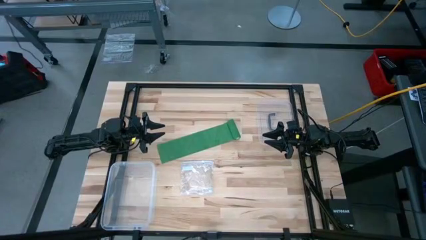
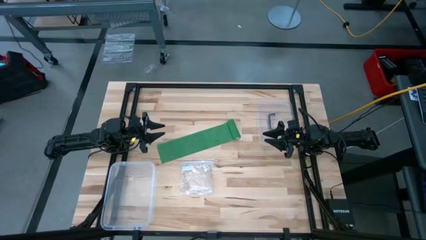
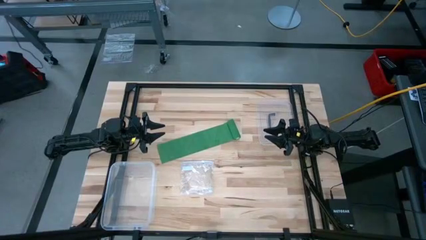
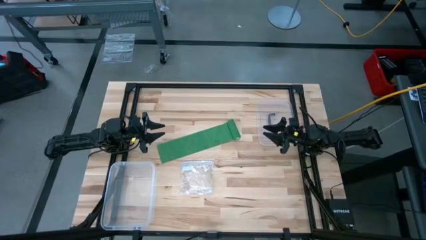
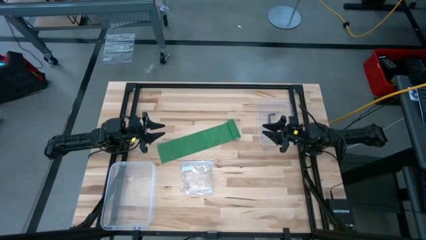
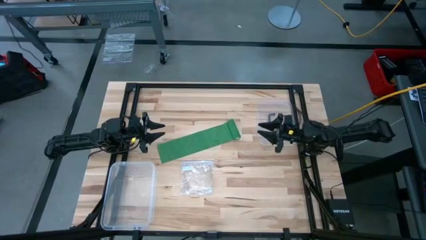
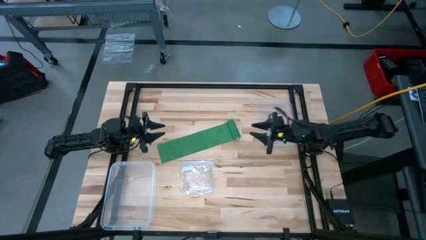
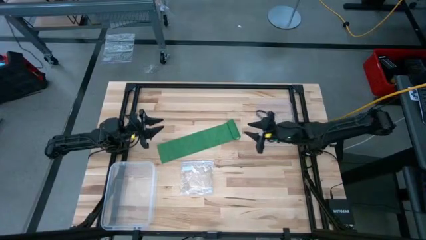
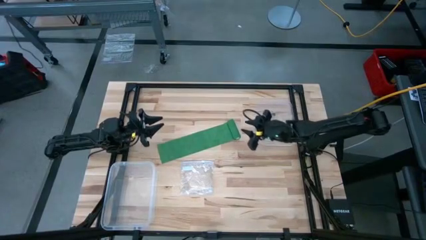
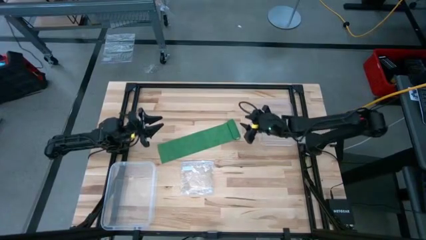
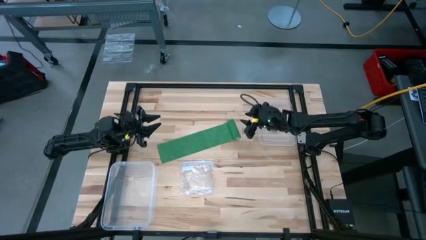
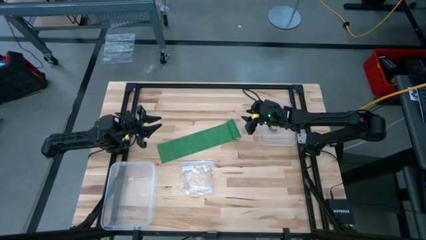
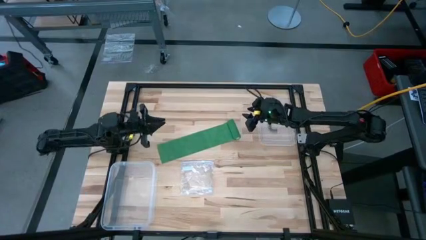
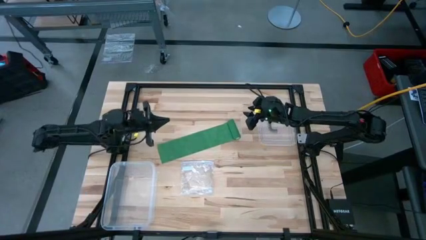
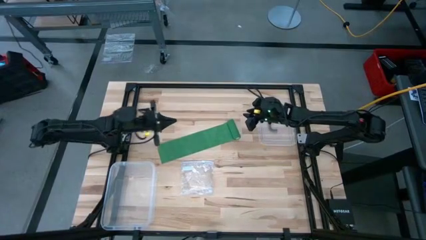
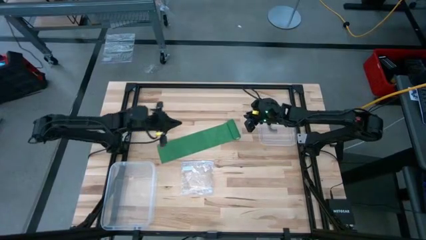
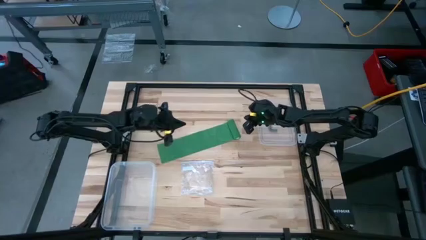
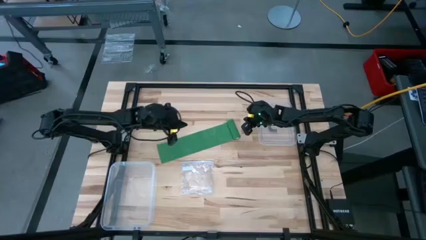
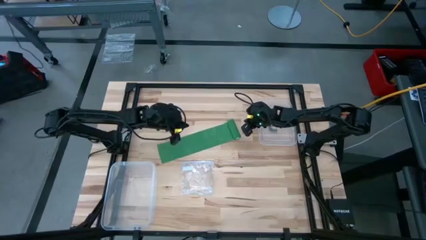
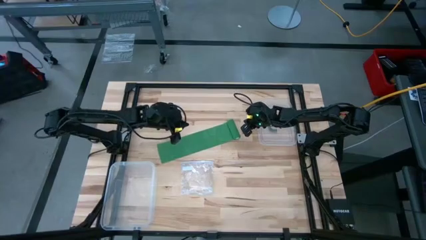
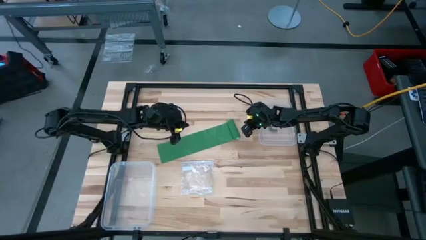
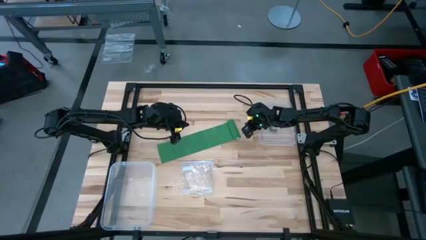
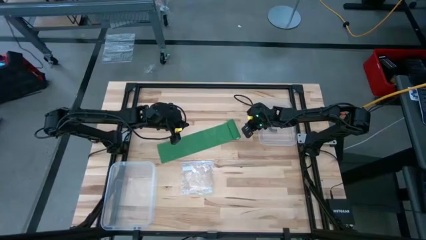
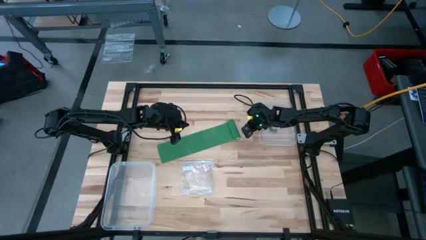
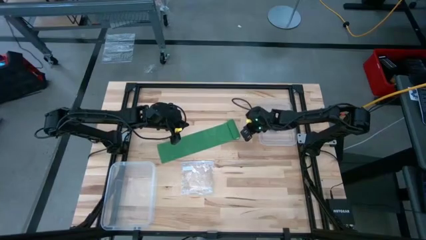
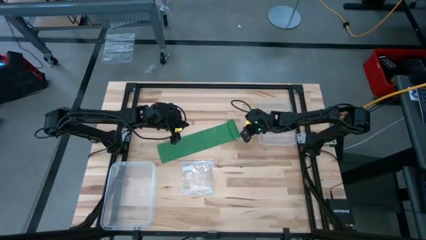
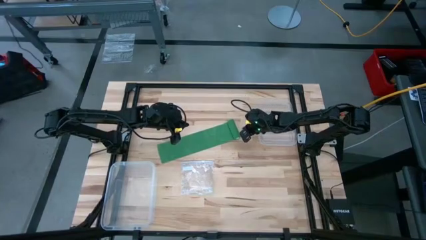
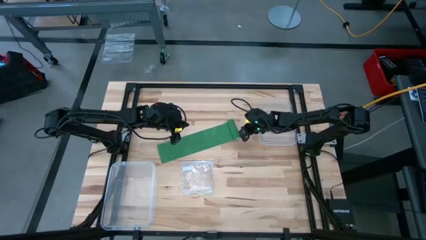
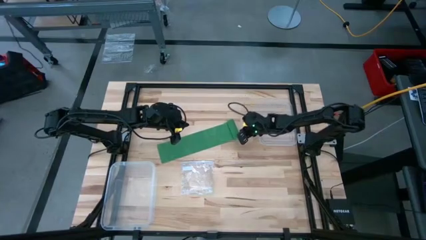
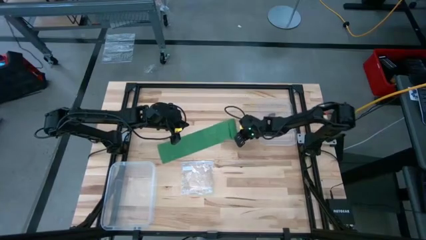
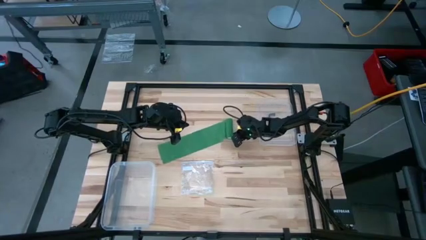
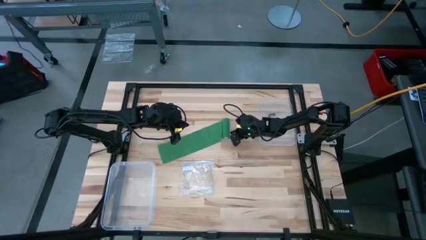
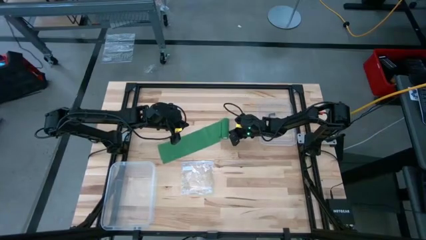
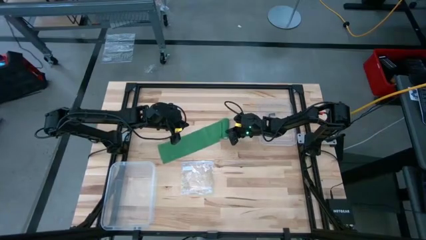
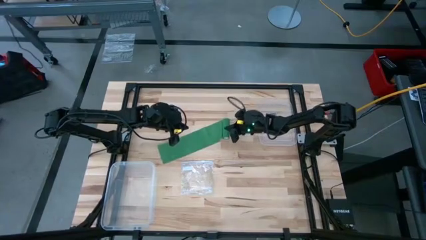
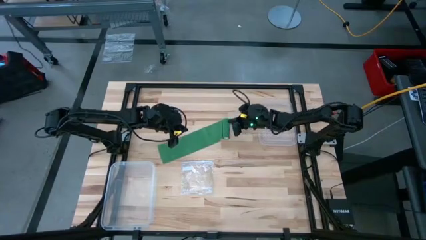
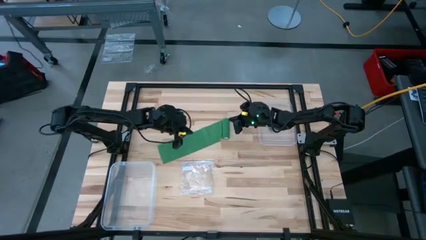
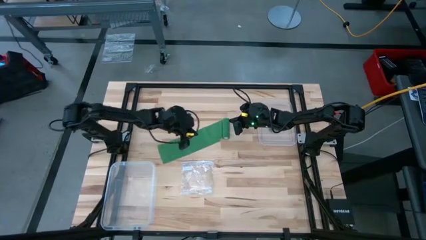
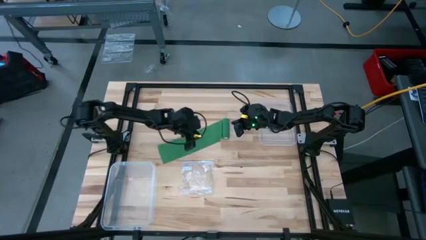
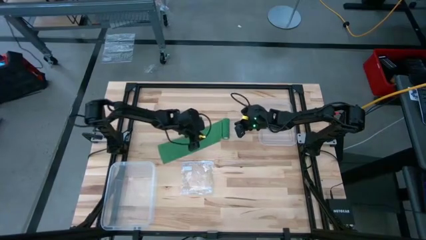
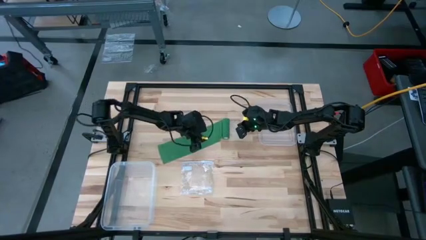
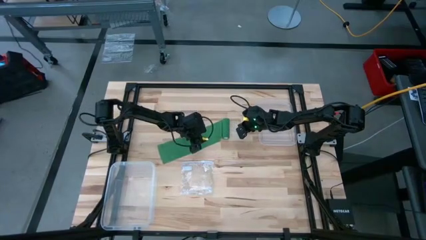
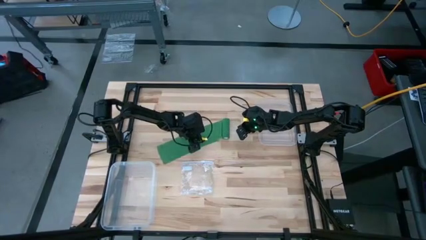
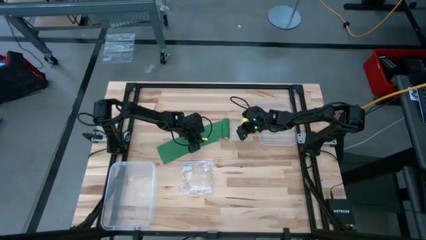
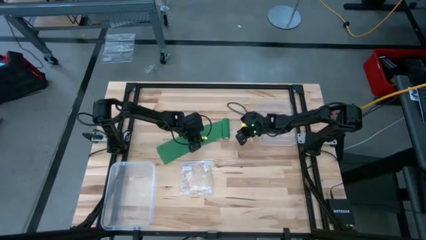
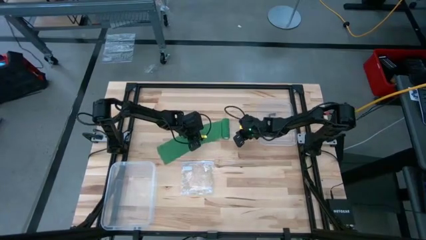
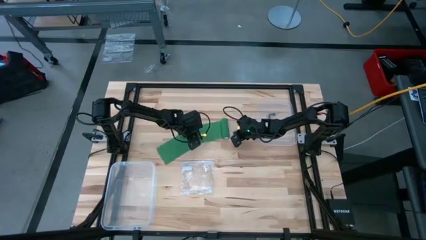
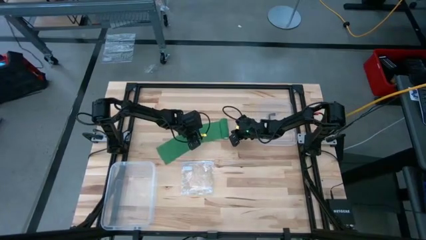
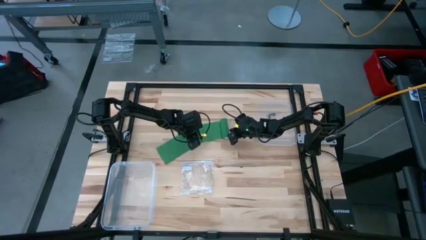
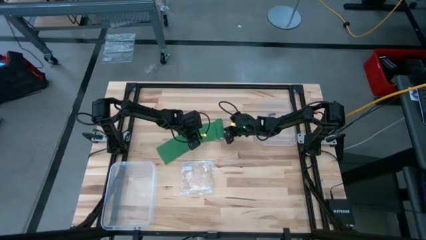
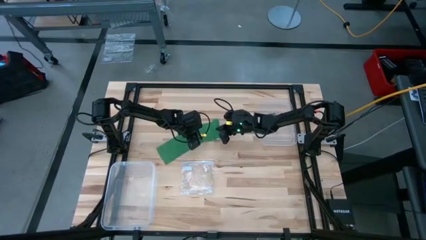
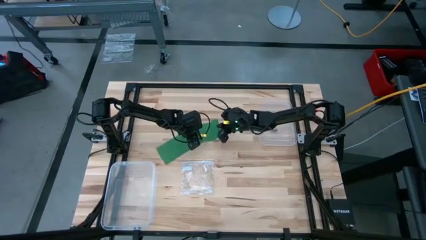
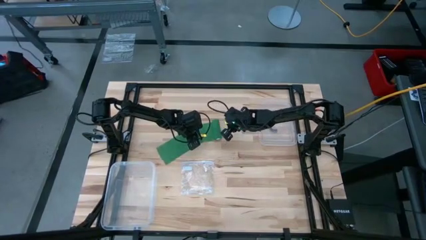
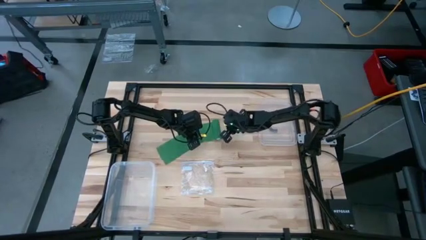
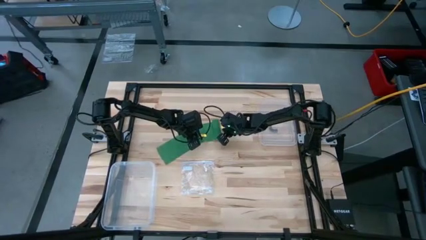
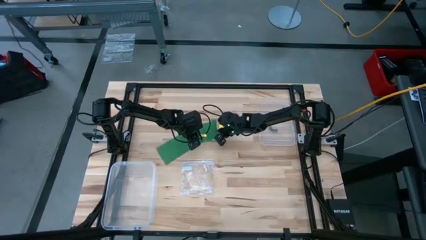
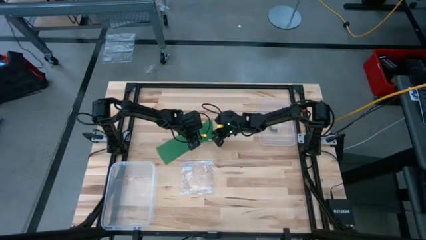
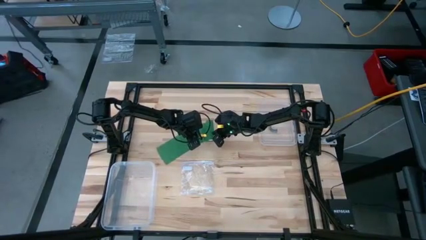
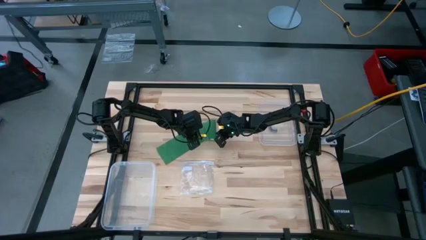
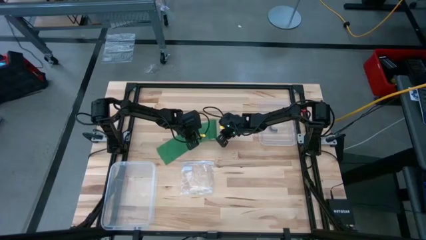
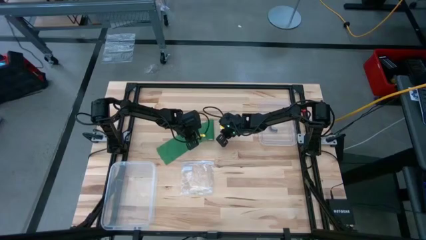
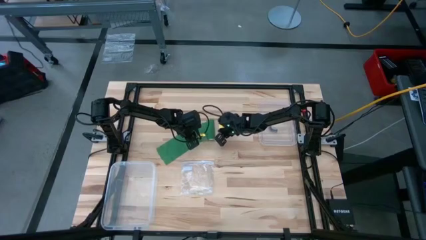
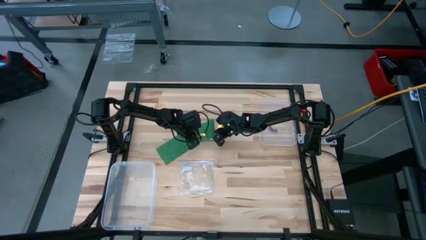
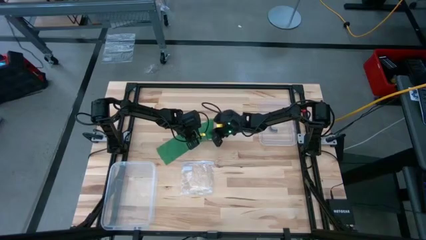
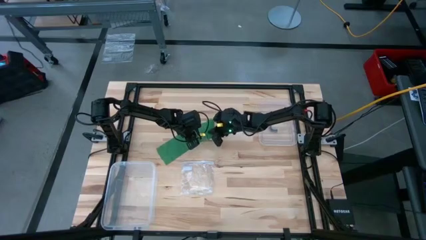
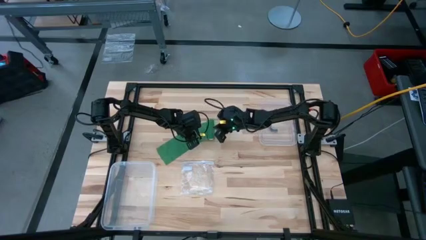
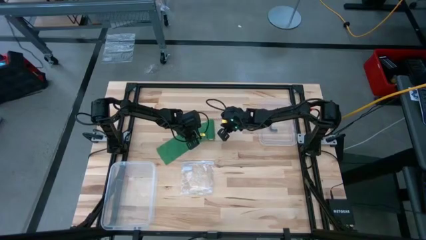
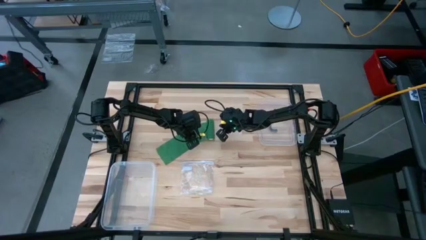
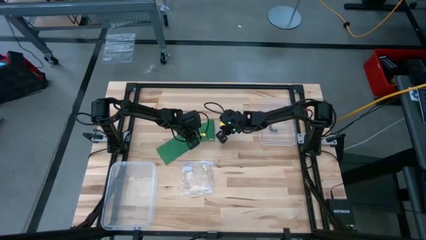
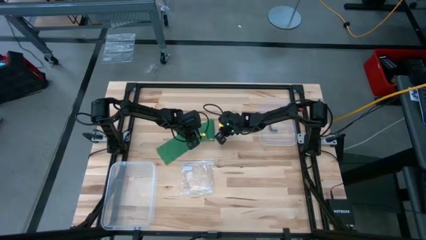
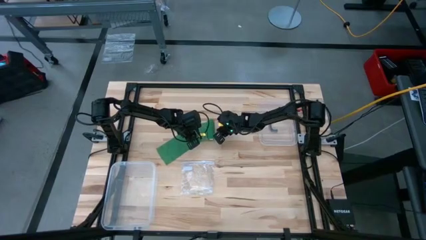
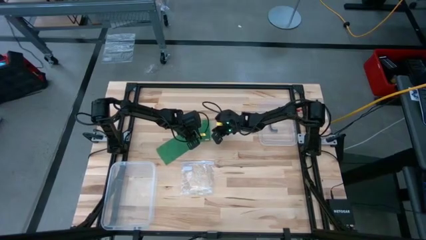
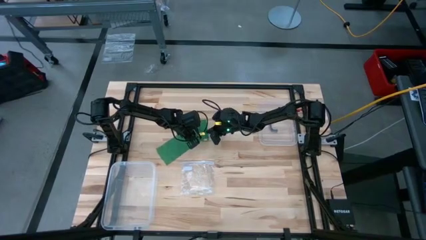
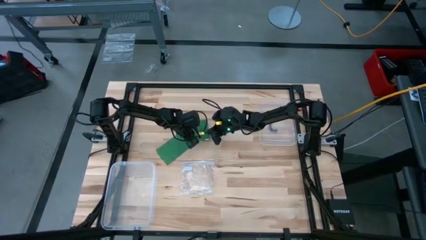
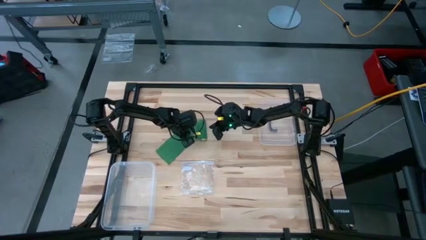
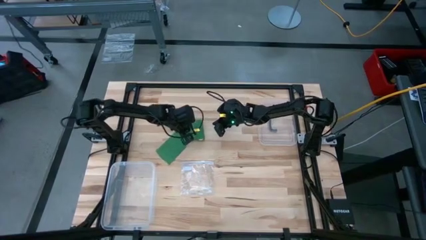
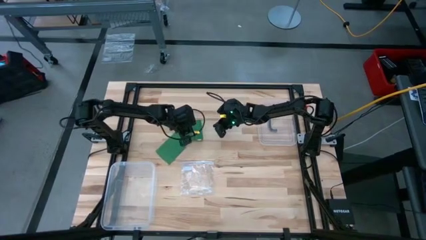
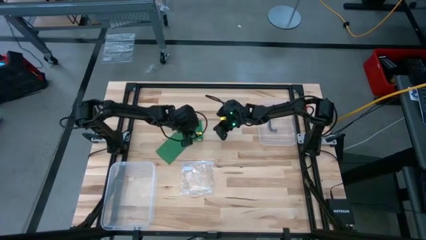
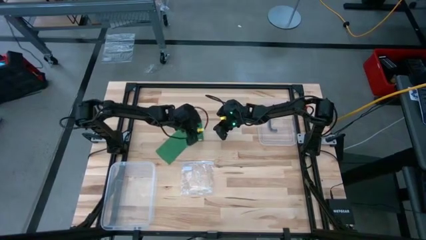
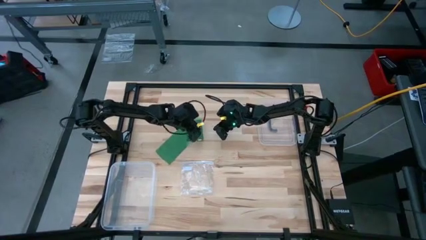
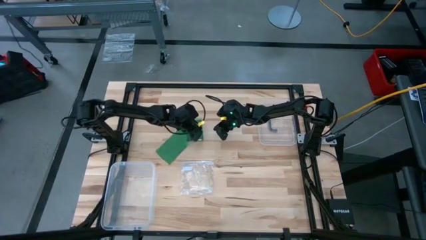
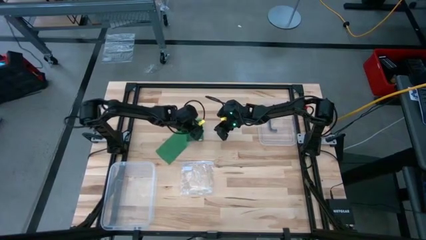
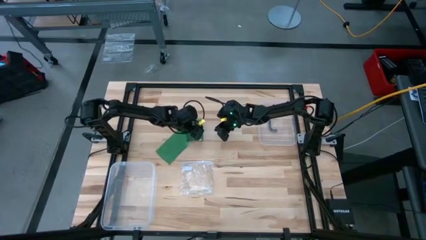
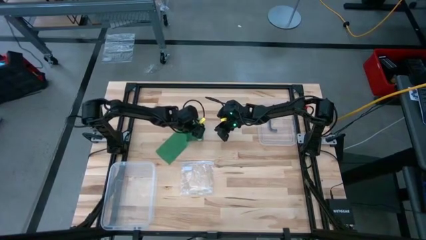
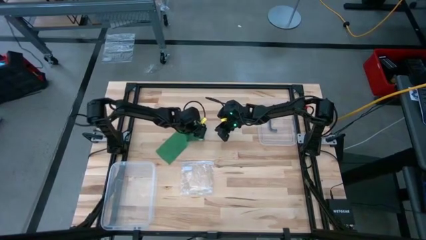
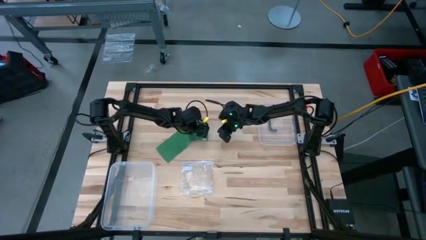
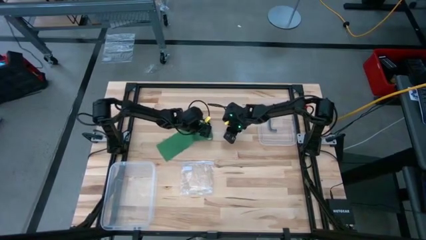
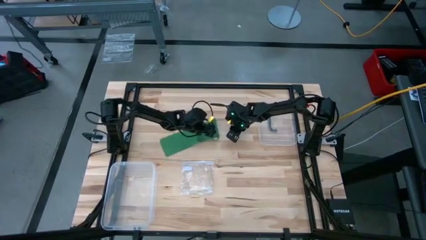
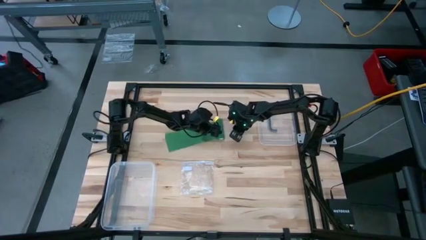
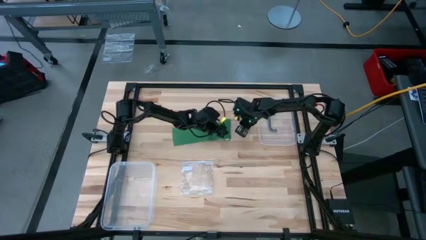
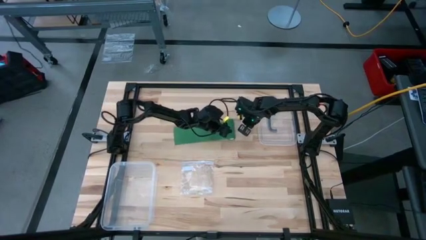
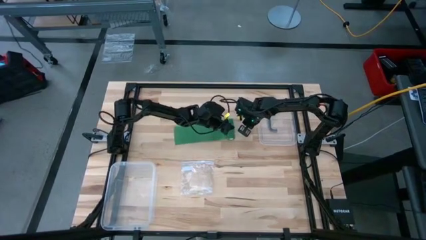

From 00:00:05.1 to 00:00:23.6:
Task: Roll bandage
Roll the bandage
